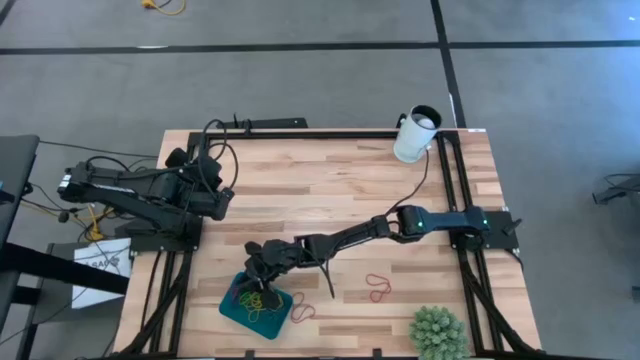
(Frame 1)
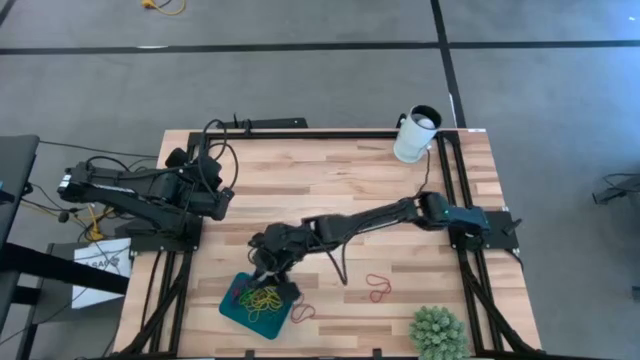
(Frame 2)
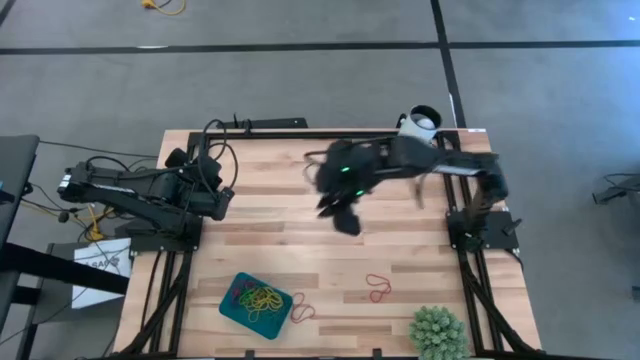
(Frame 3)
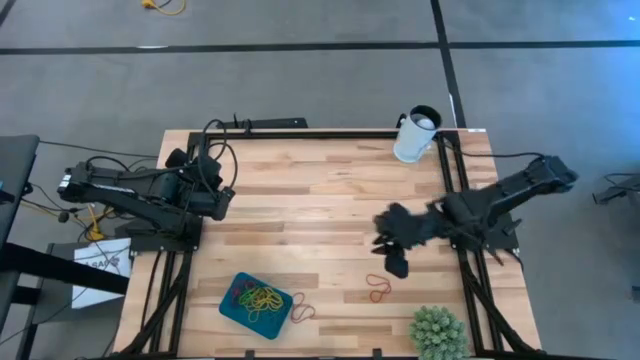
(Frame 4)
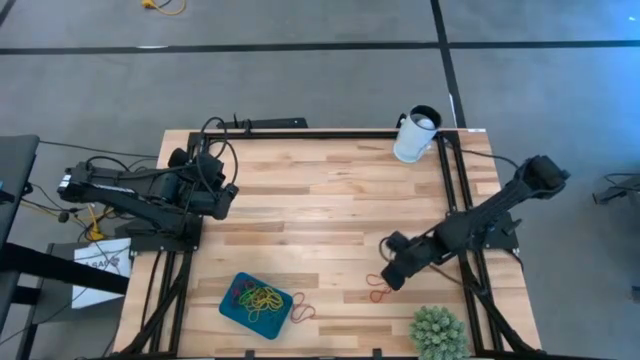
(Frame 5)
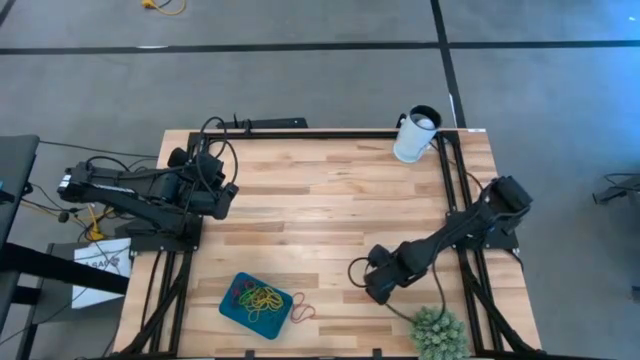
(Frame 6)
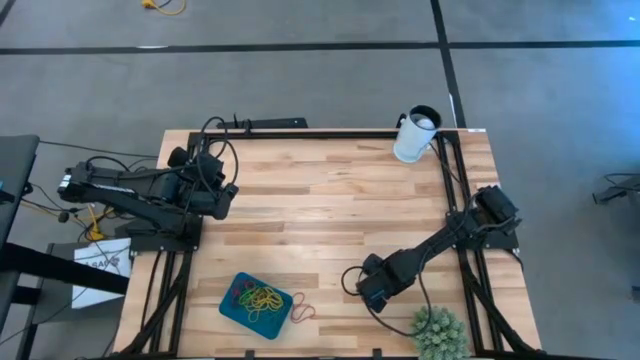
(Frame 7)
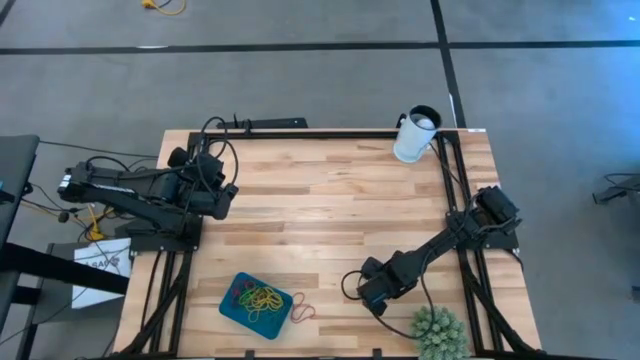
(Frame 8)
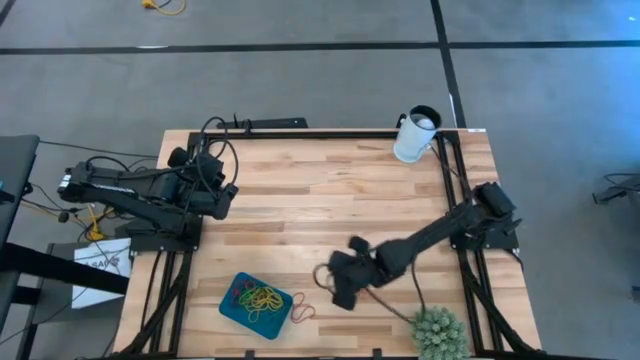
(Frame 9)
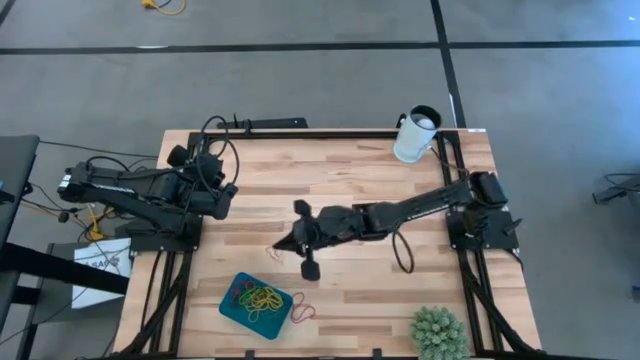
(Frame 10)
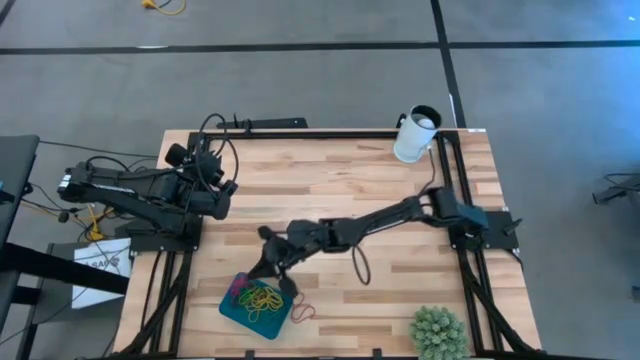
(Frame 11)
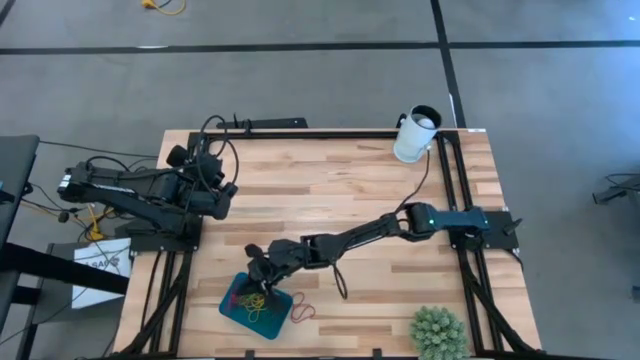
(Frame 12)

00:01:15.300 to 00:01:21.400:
Task: Pick and place items into bin
Put the red rubber band into the blue bin

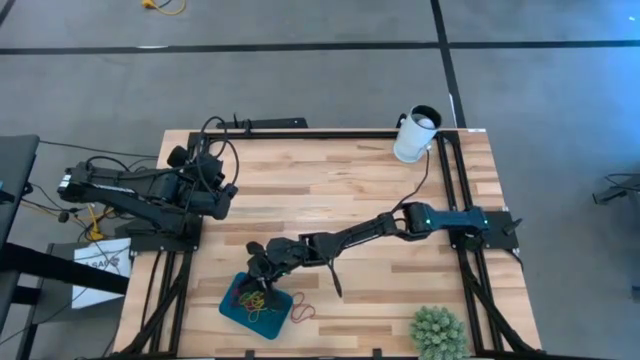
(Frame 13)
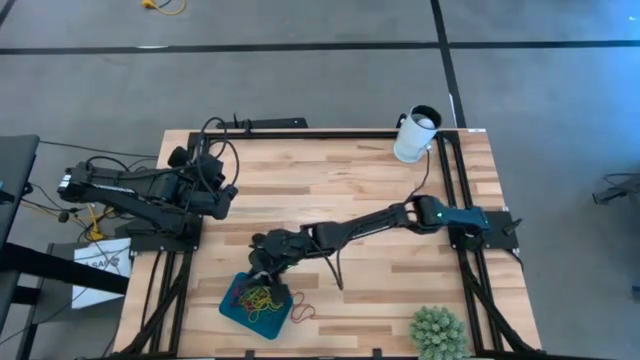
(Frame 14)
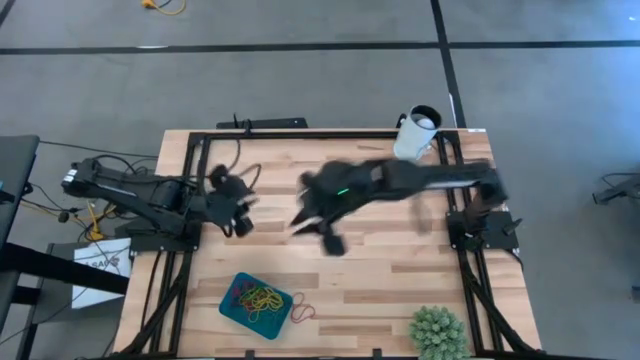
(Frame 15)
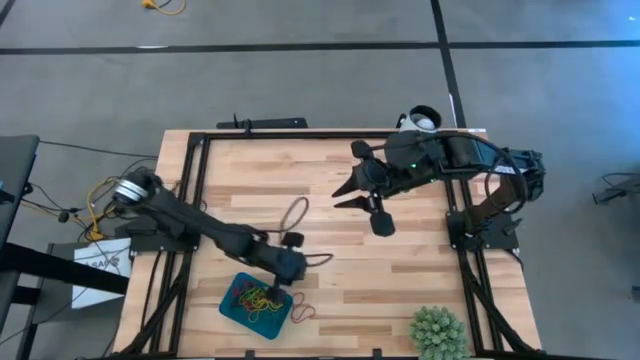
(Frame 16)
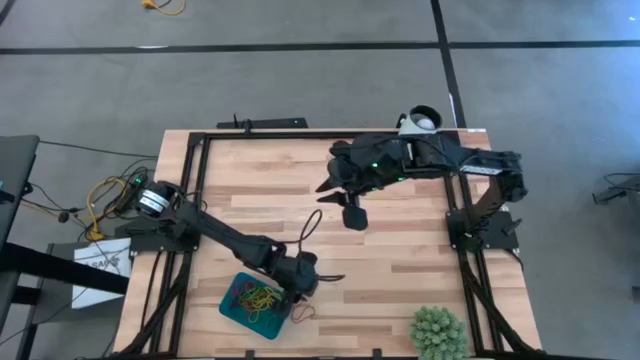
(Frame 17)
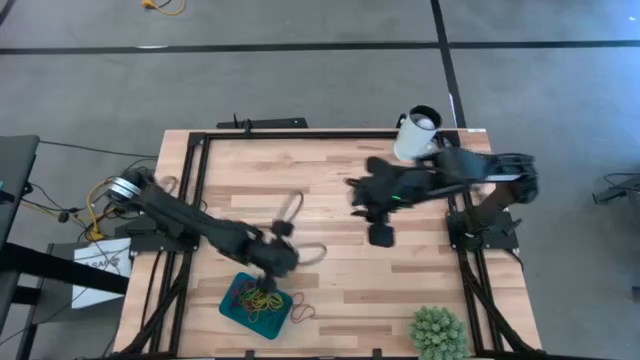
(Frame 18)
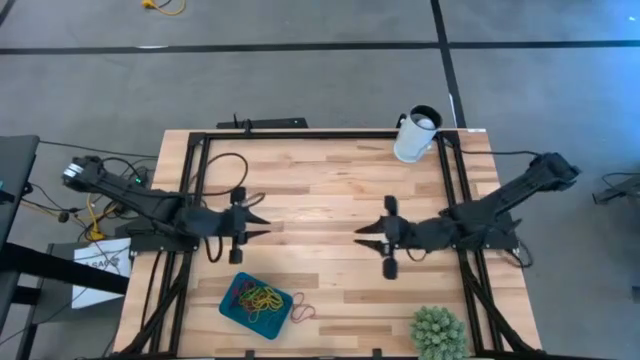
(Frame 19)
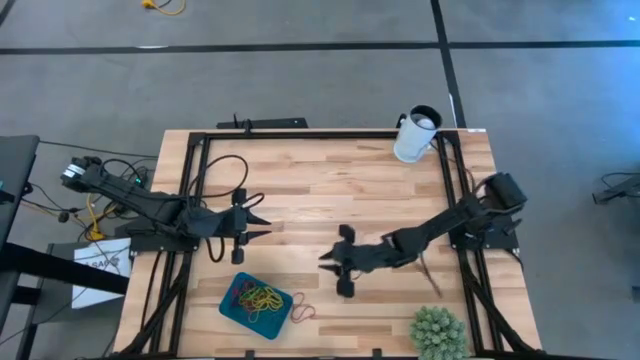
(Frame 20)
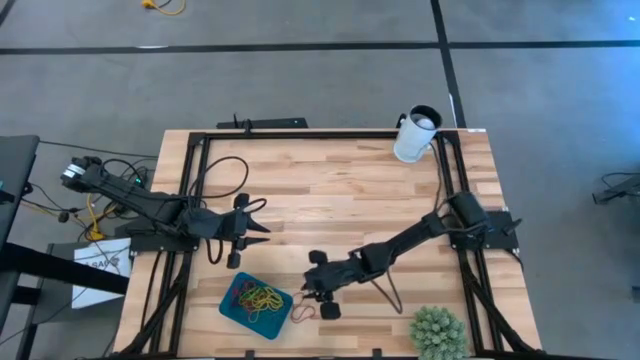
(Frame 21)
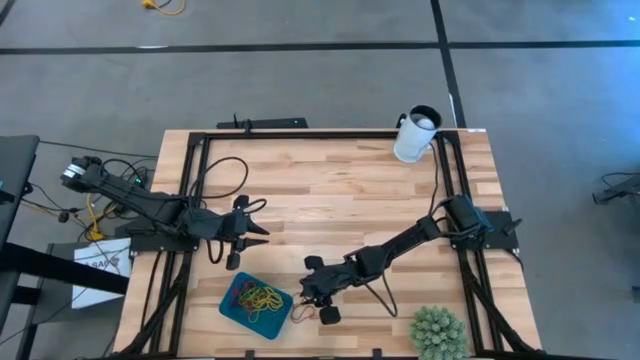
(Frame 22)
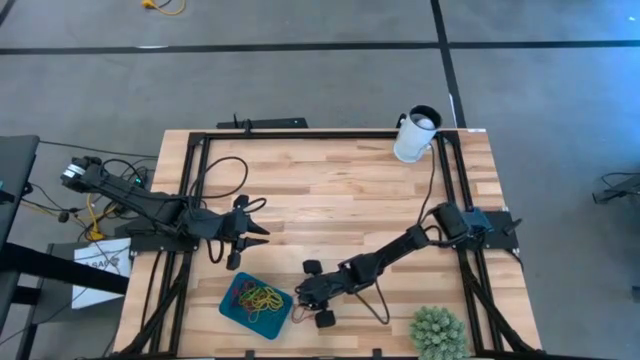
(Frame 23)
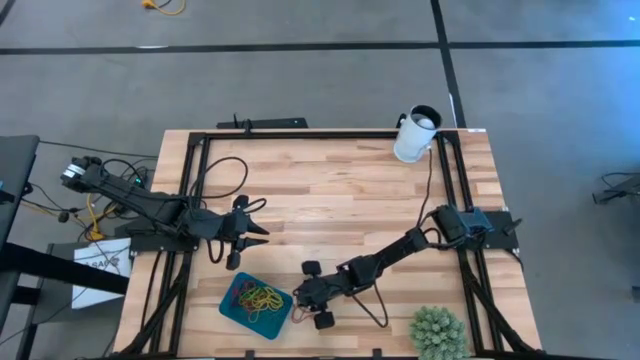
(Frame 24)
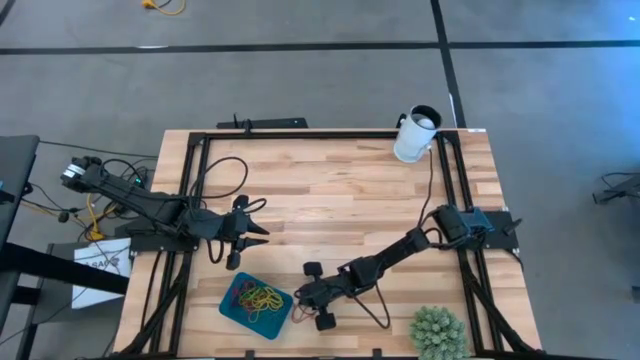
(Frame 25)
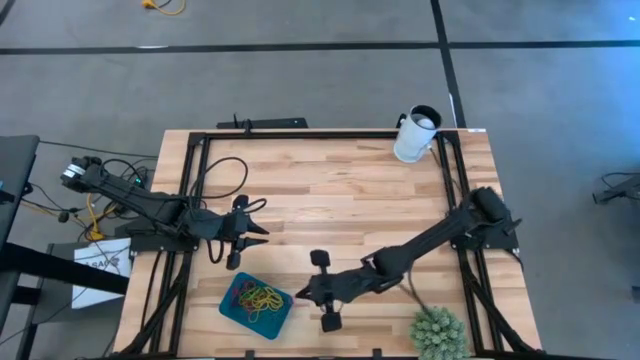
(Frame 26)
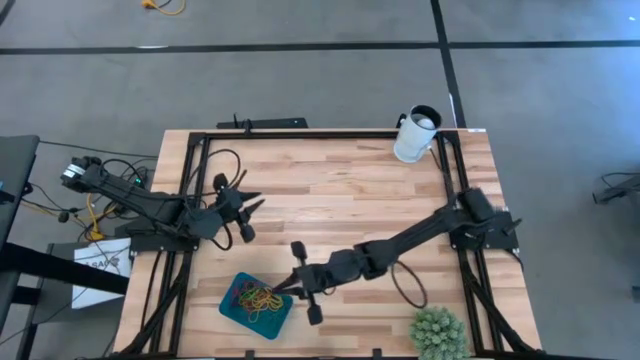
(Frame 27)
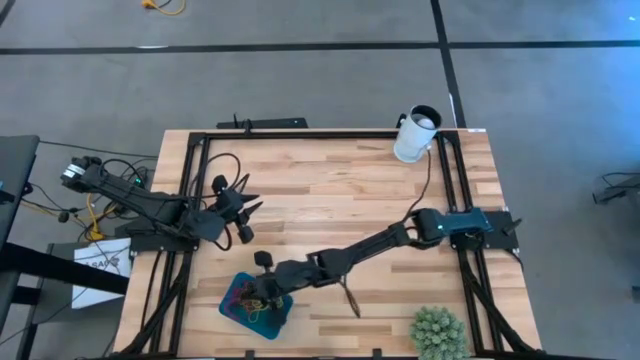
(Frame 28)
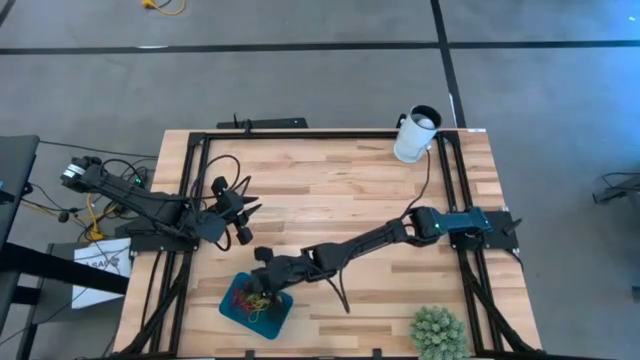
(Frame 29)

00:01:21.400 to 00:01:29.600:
Put the red rubber band into the blue bin

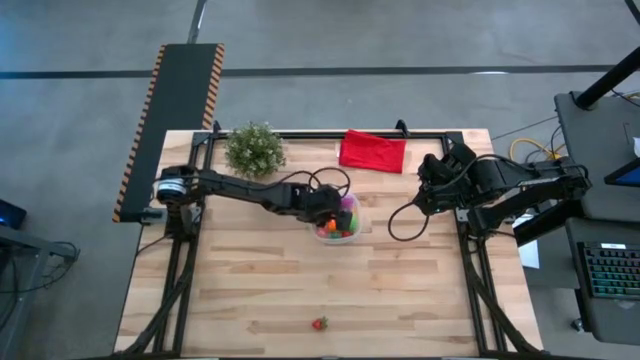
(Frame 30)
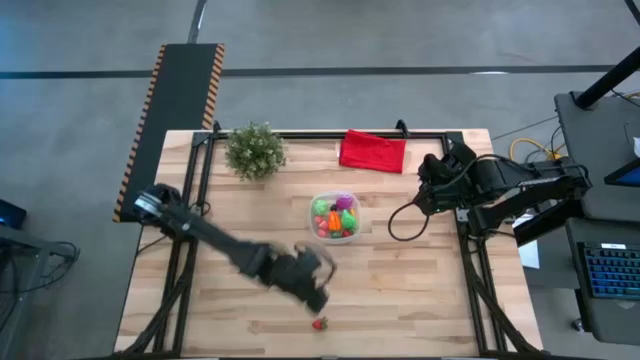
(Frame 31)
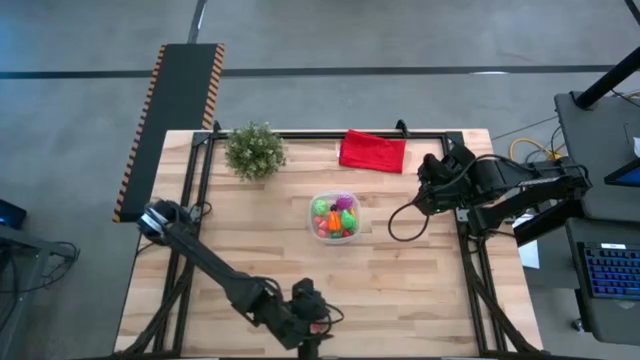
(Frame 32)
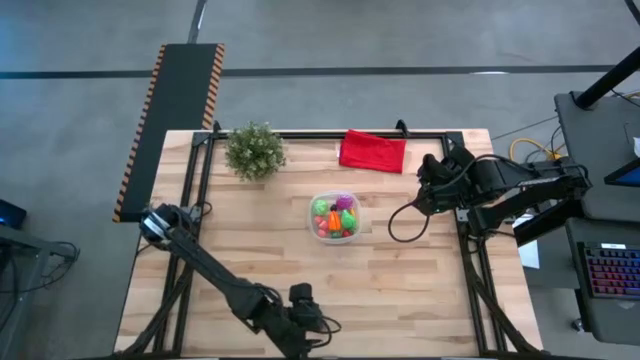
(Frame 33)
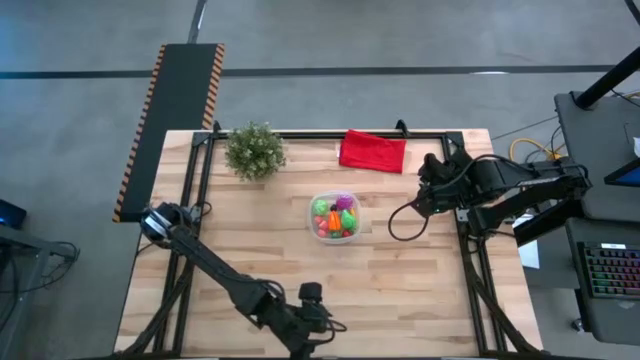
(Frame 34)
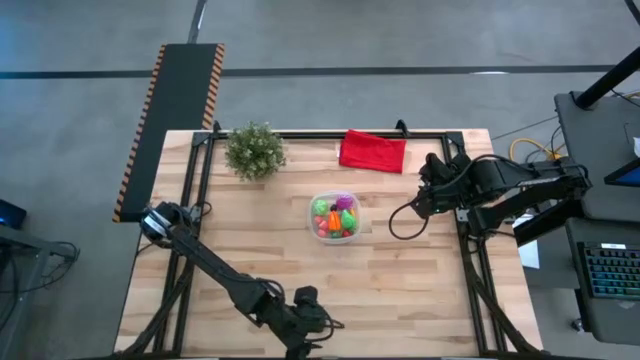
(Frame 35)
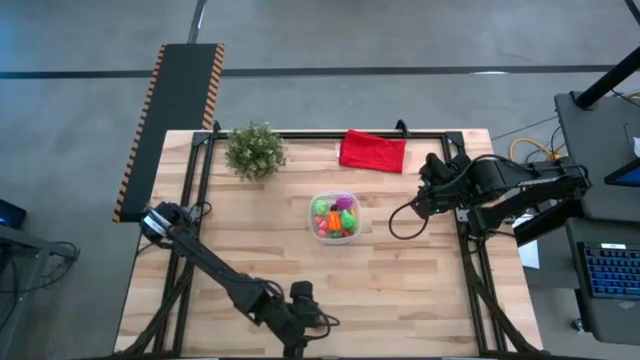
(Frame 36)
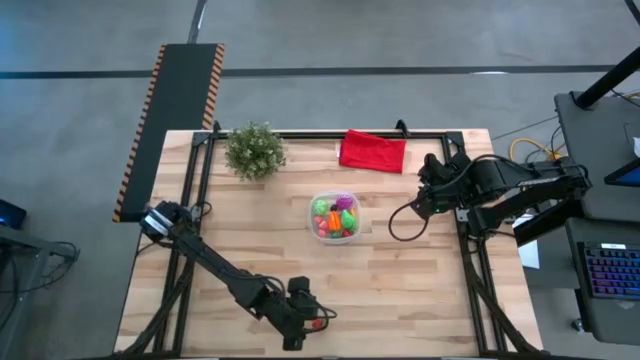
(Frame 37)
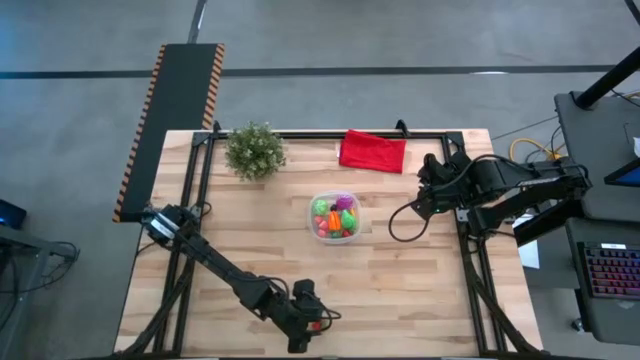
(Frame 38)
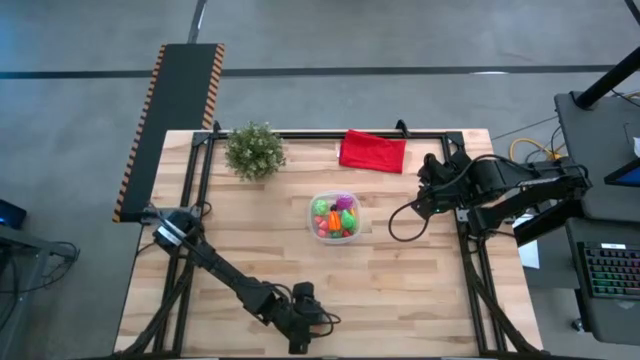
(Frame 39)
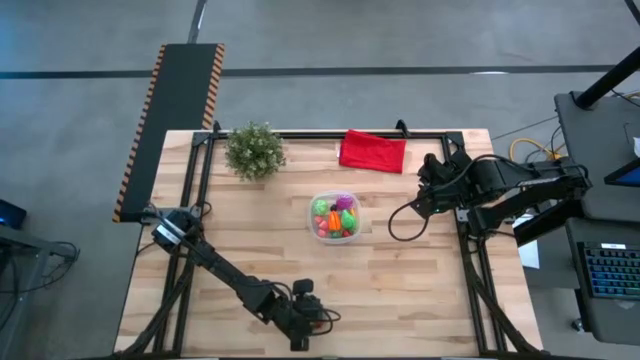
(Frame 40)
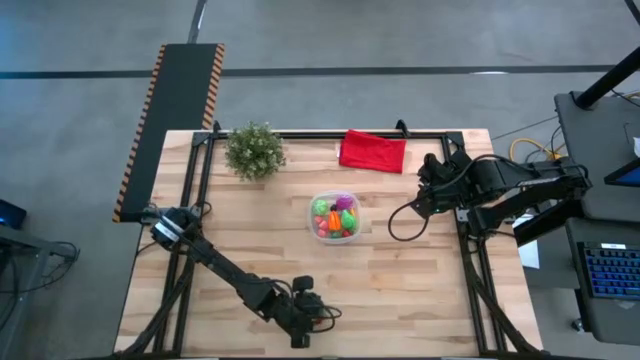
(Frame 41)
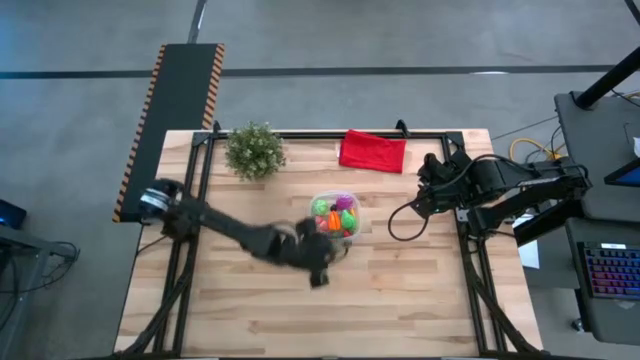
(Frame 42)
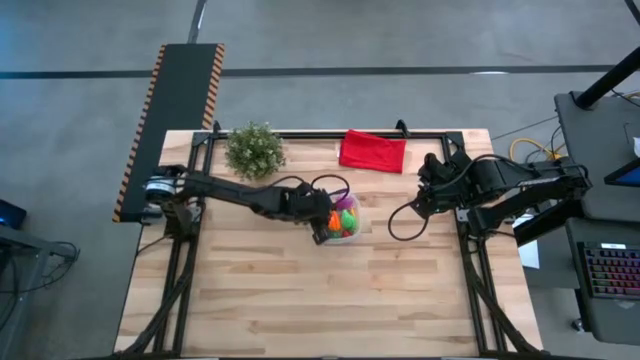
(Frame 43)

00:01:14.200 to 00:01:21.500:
Task: Pick and placing Produce into tupperware
Put the red strawberry into the transparent container
